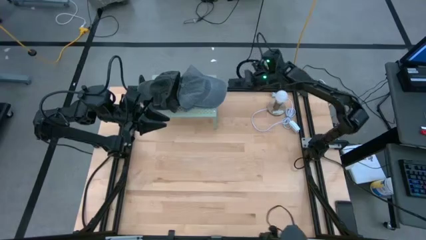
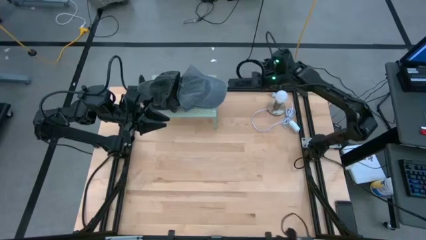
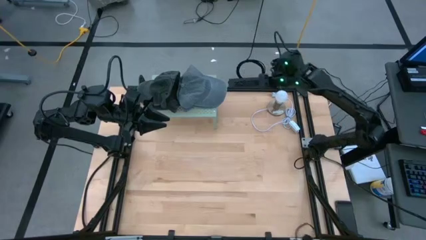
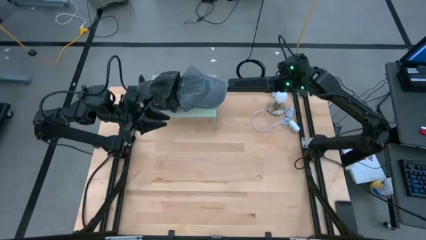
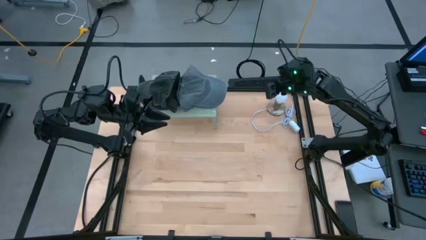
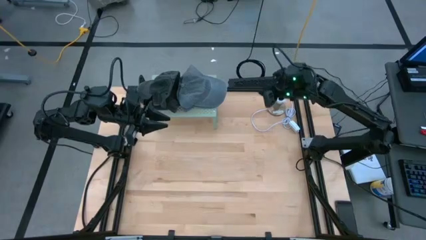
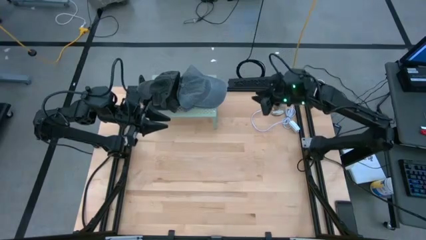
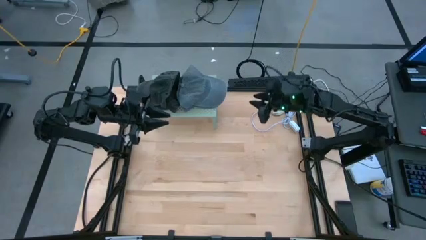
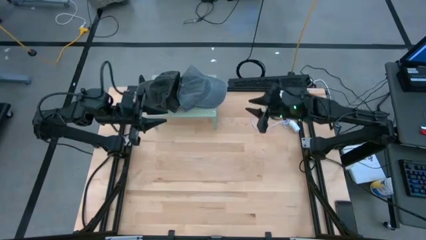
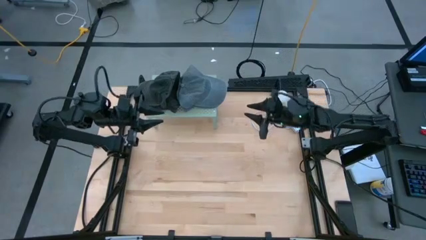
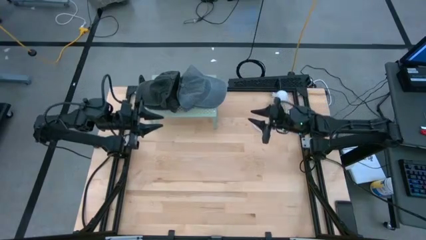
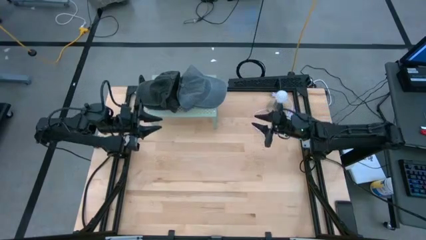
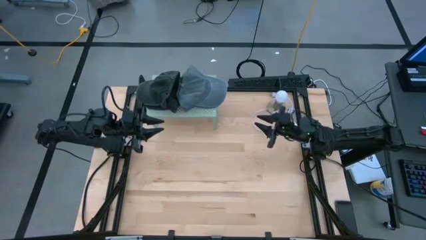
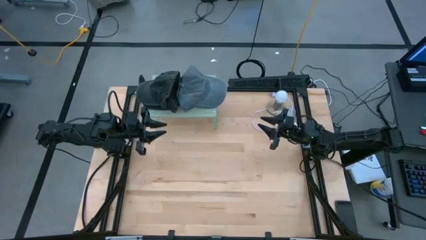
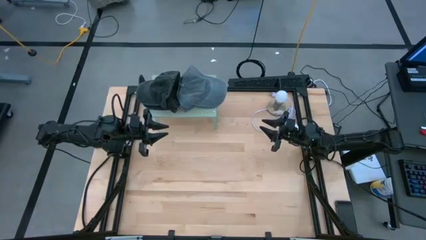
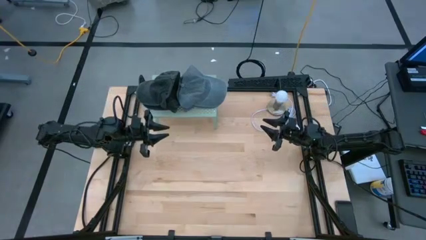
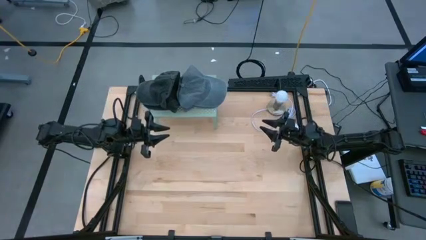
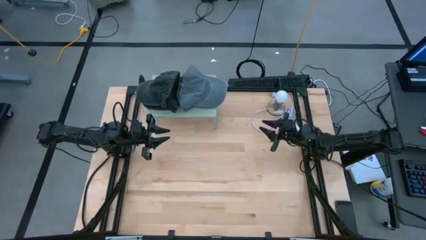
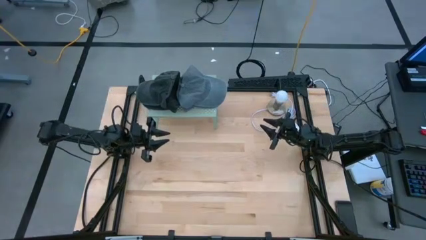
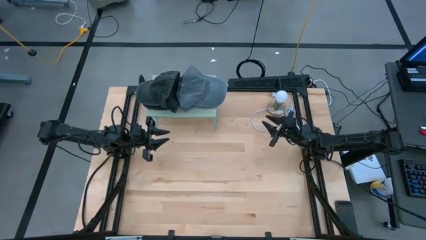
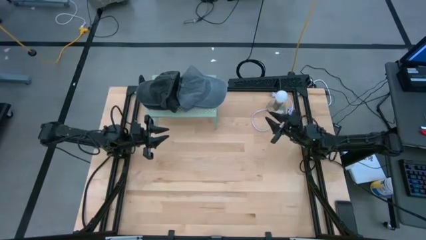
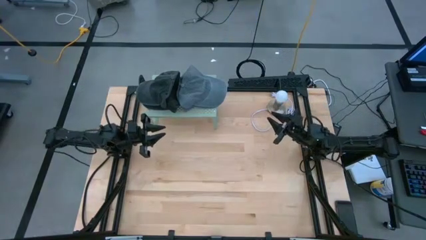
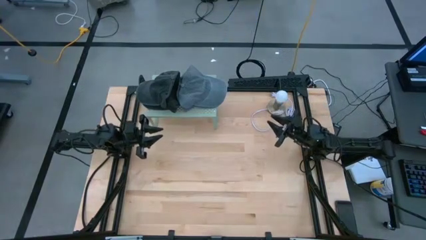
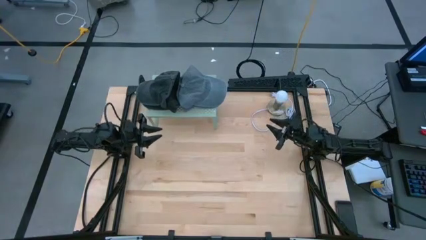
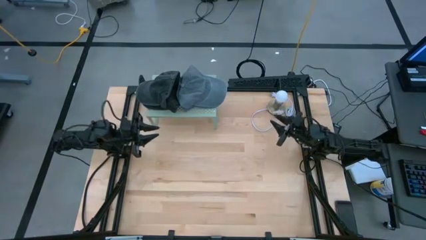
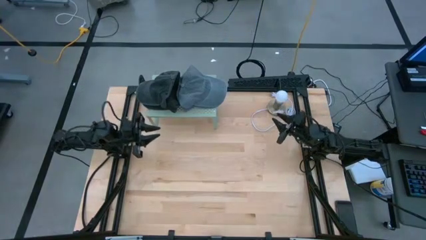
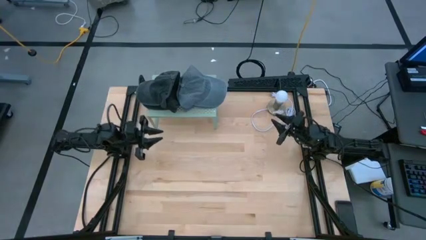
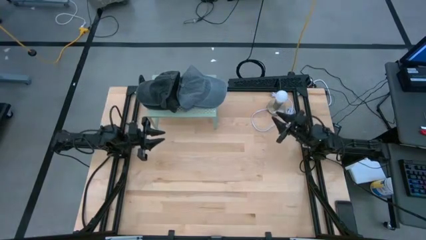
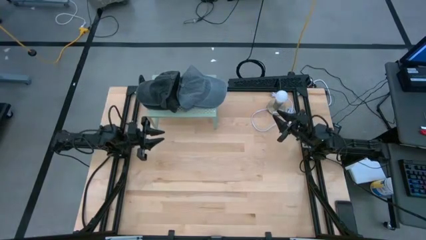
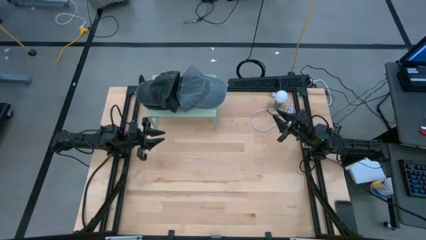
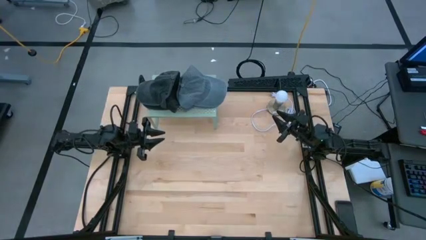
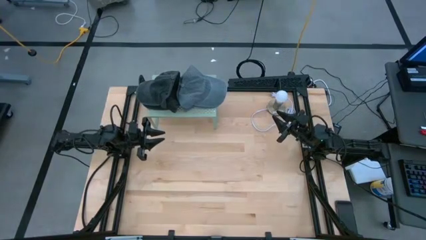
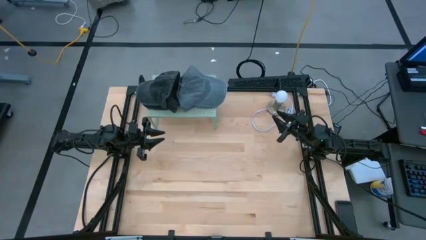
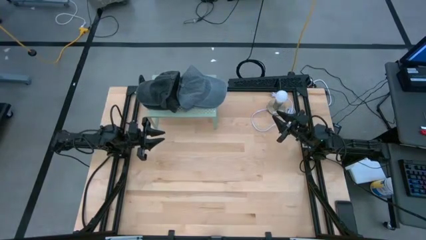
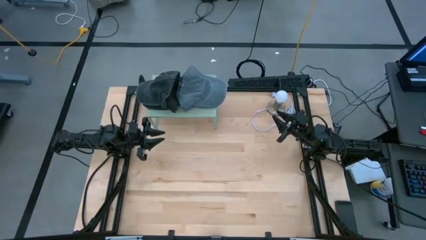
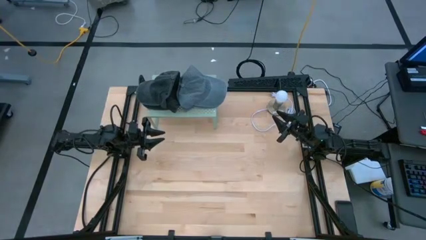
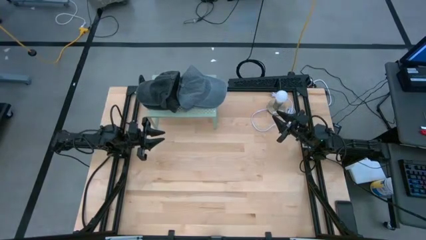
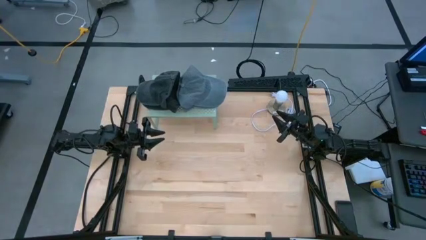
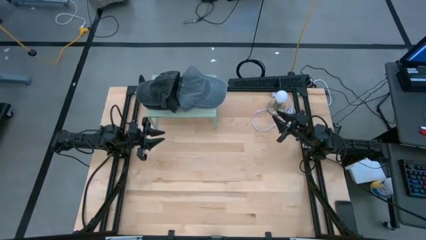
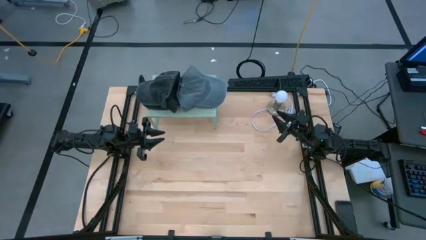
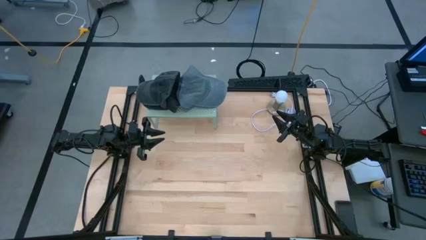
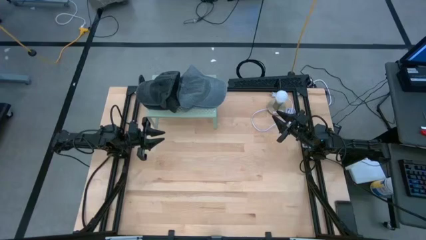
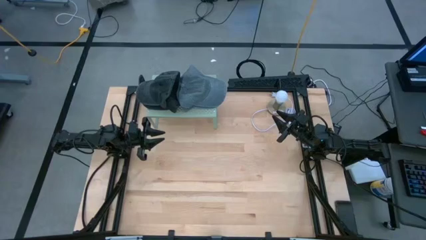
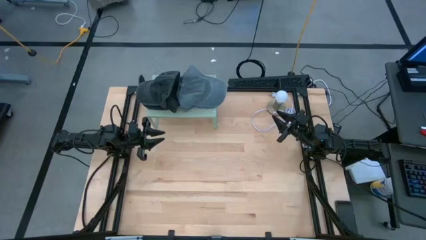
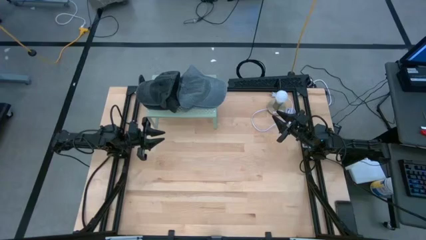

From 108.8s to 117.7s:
Task: Pick & Place hat
Return to Home Position

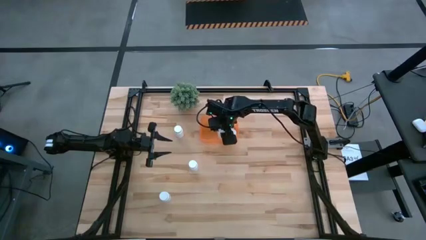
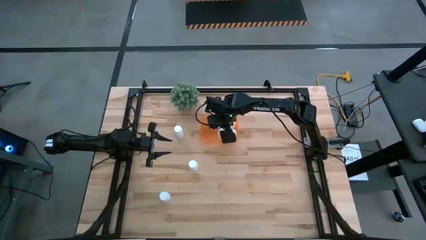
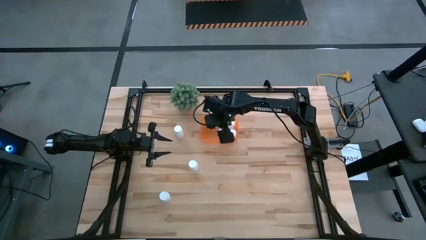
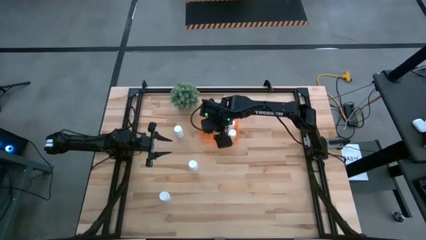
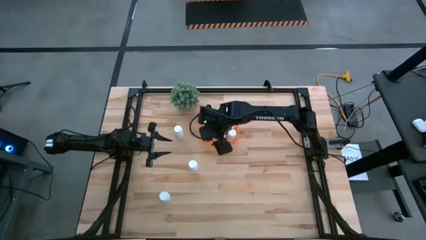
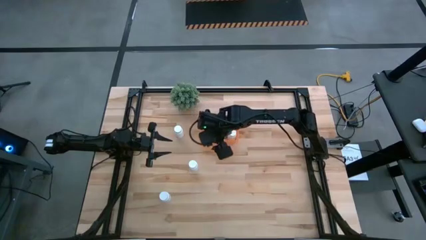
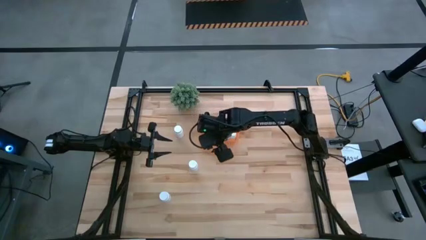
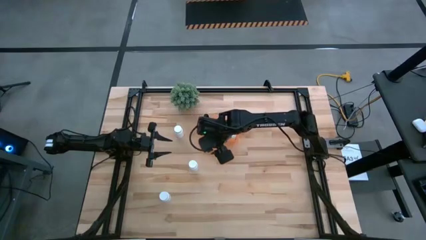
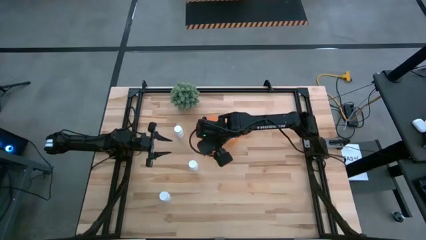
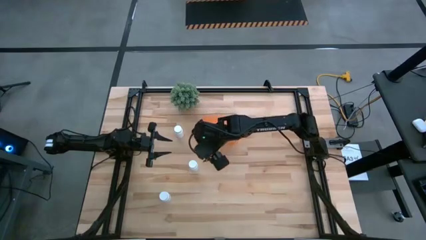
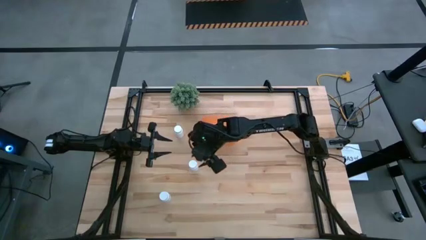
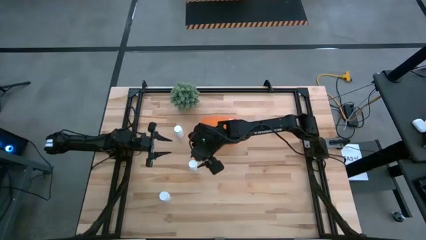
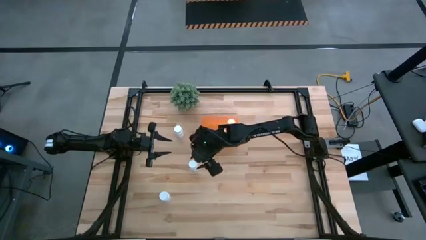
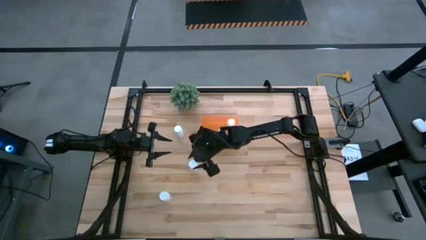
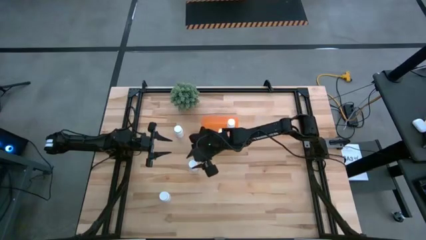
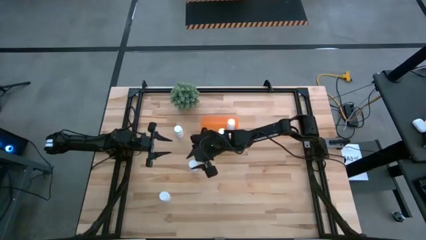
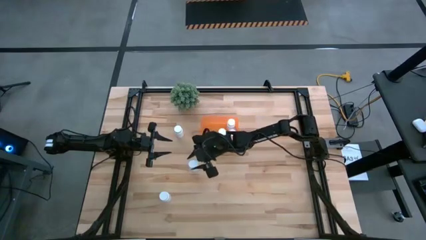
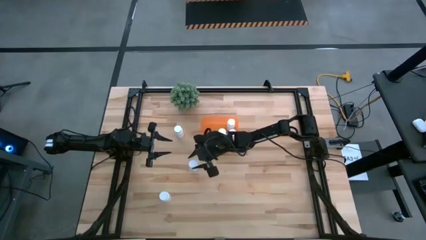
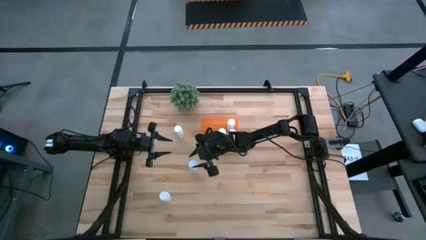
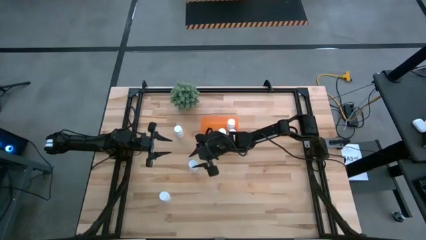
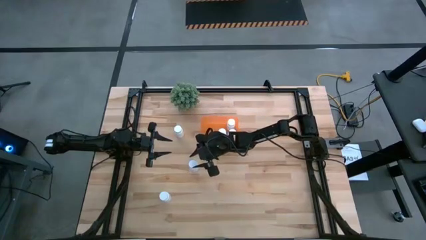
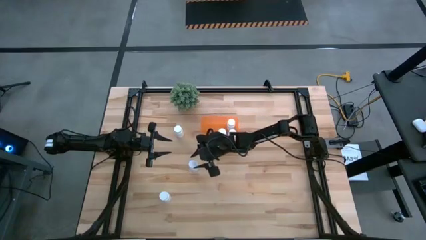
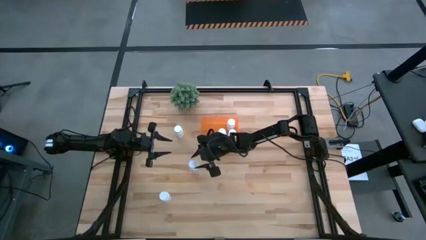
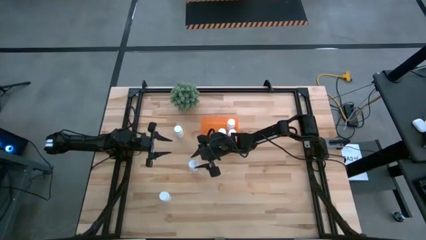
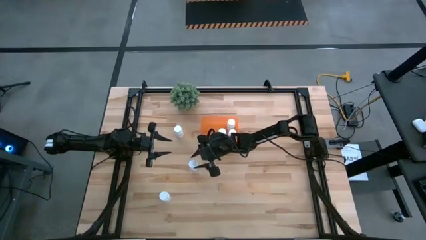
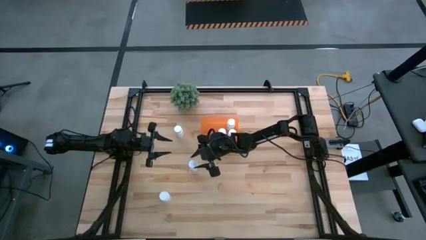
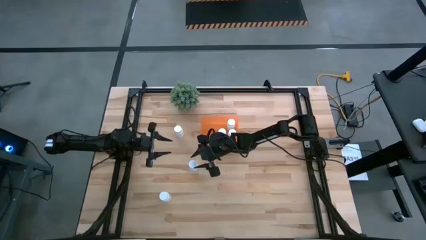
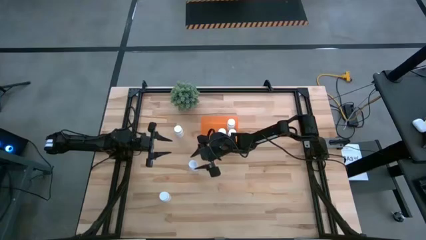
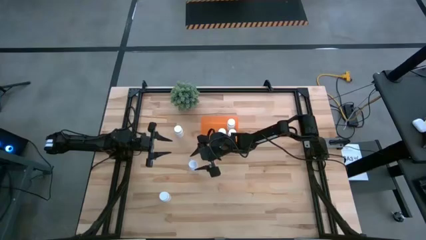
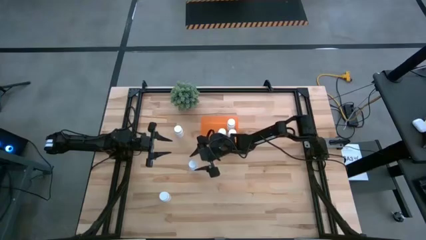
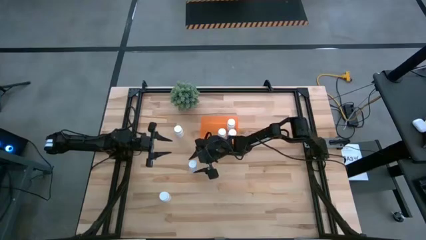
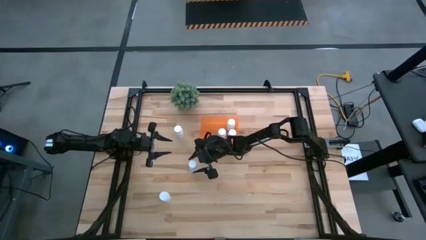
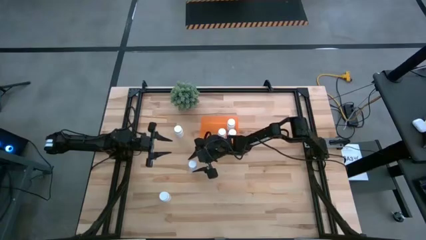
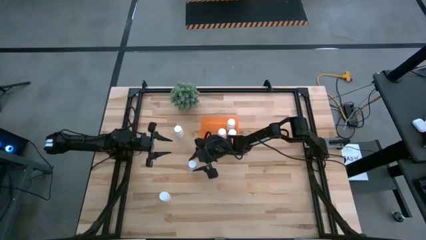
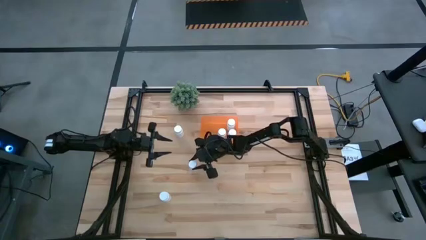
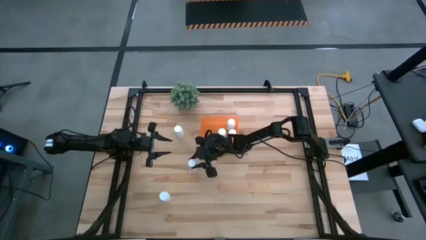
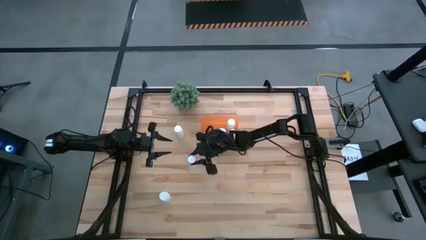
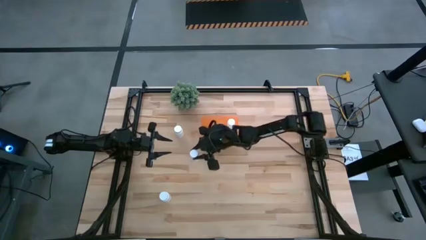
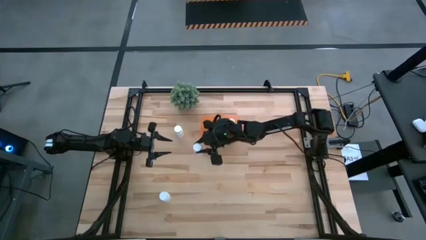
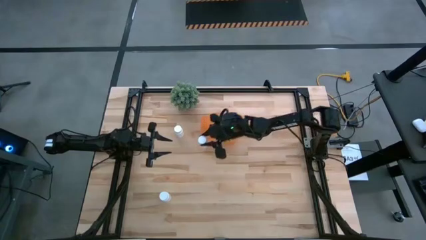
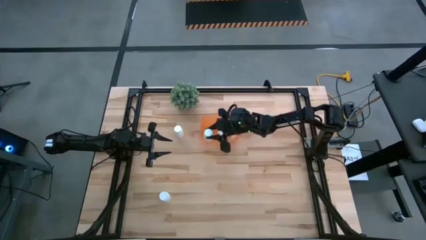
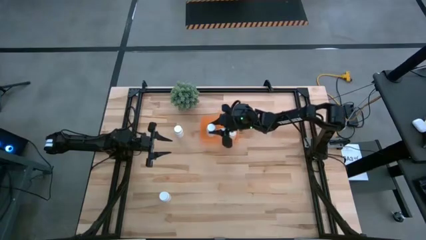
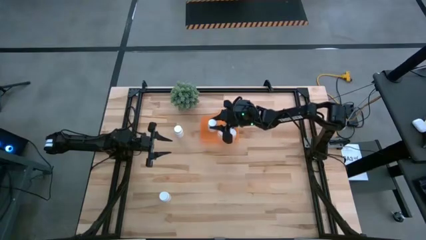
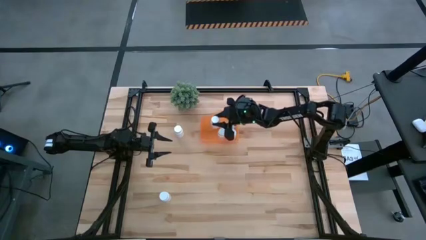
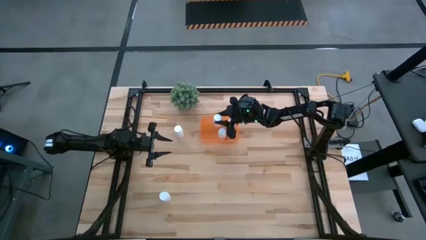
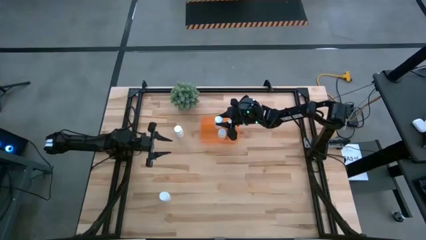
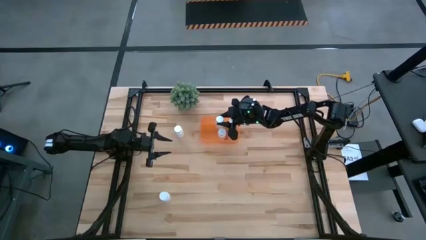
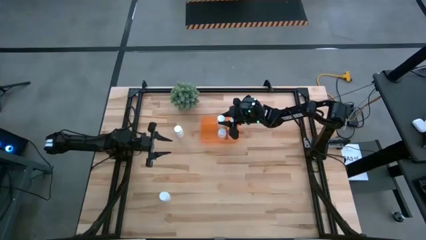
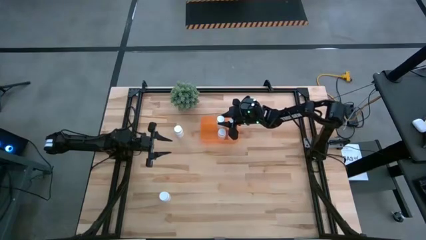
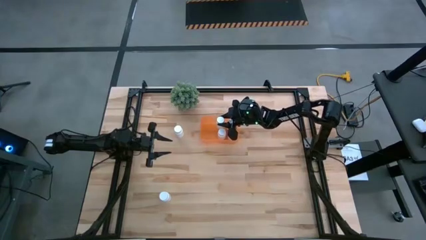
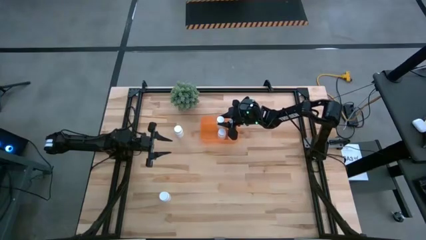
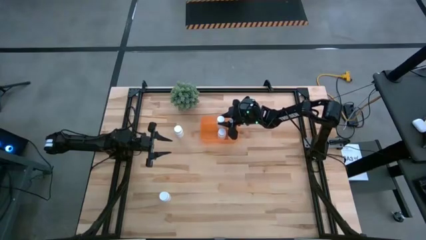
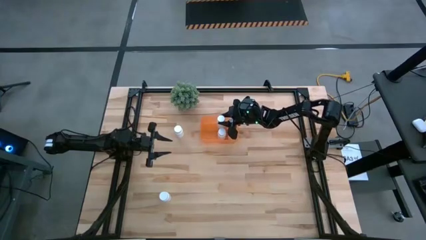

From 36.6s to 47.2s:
Task: Pick and place pill bottles into a basket
Put the white pill bottle into the orange bin
